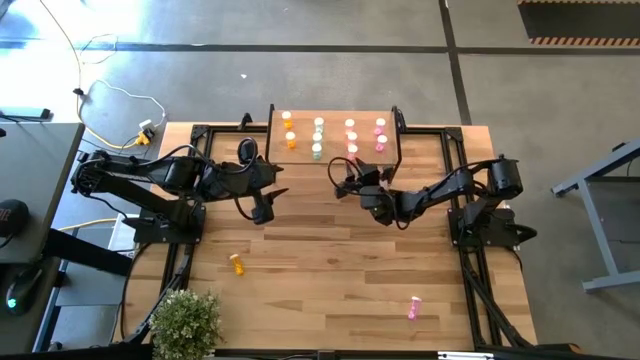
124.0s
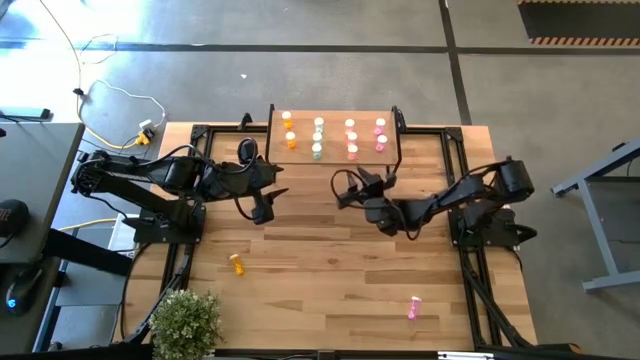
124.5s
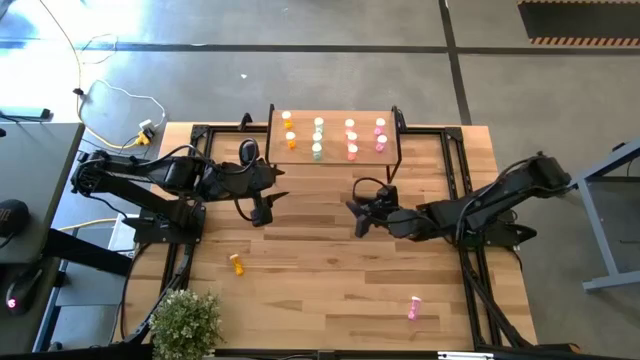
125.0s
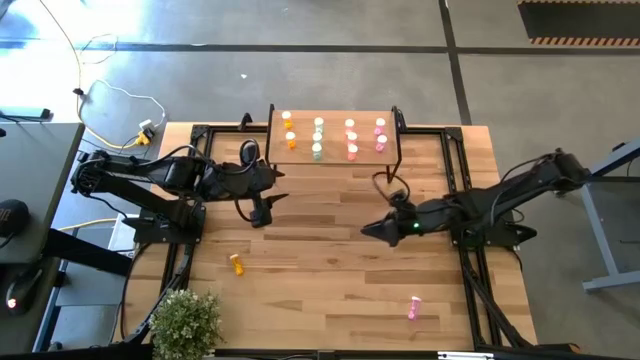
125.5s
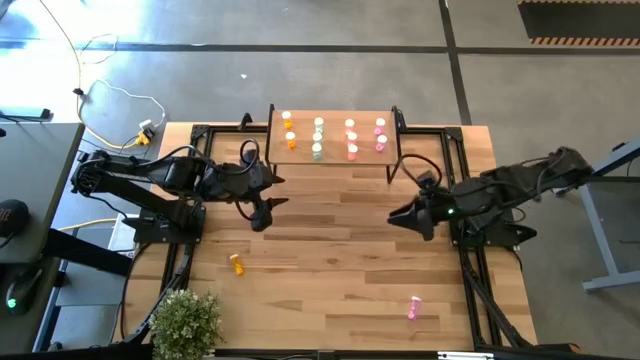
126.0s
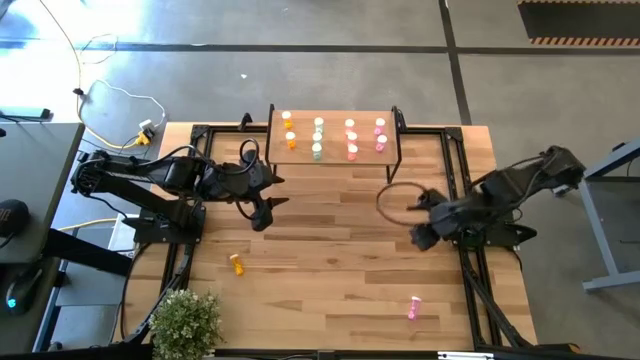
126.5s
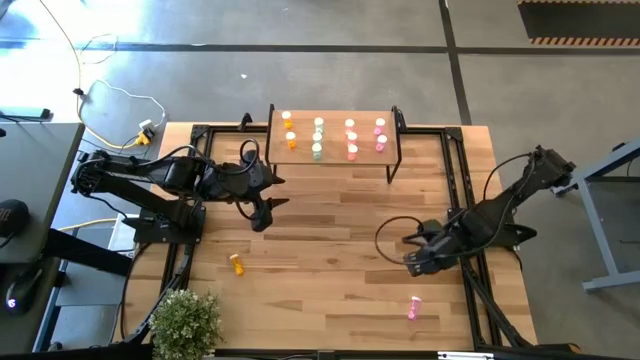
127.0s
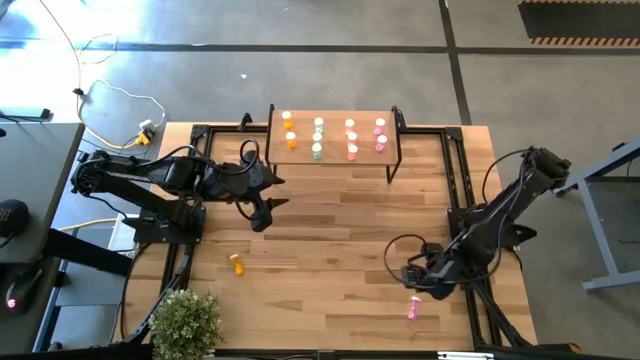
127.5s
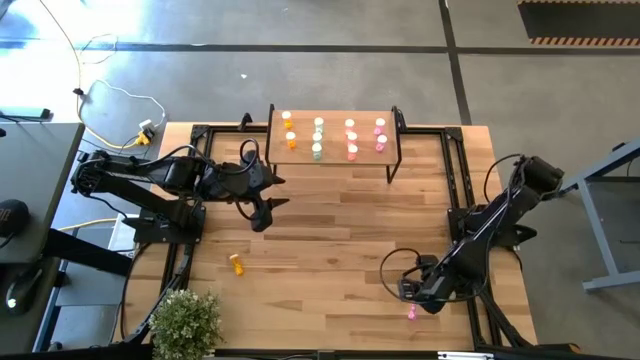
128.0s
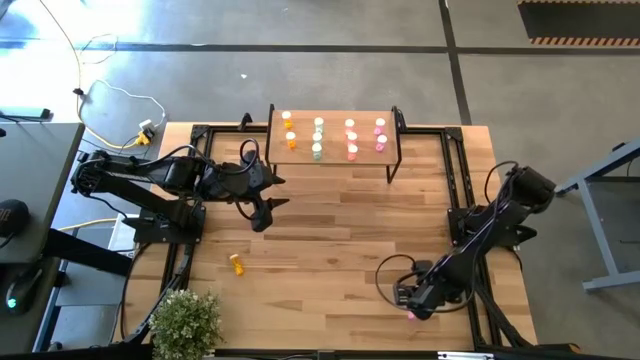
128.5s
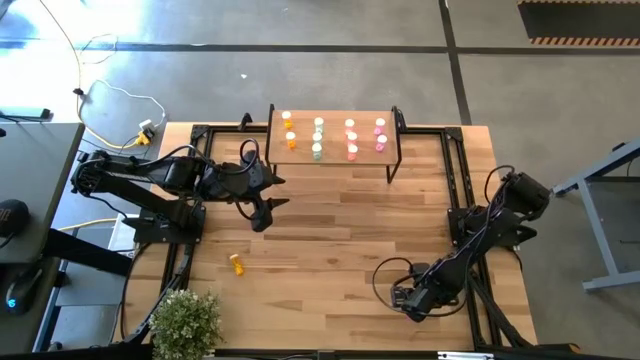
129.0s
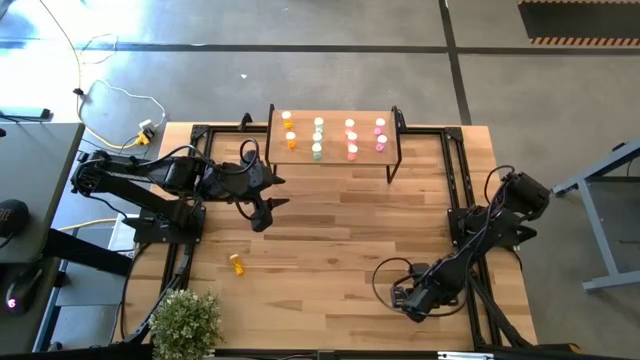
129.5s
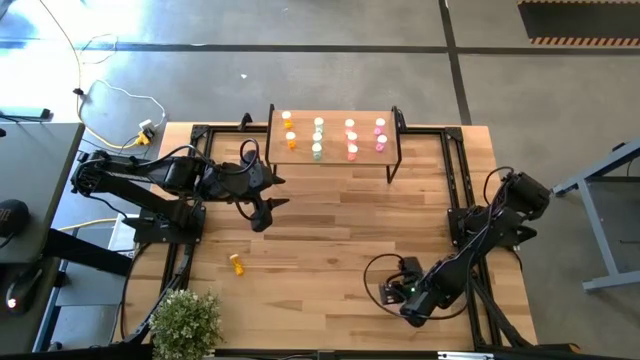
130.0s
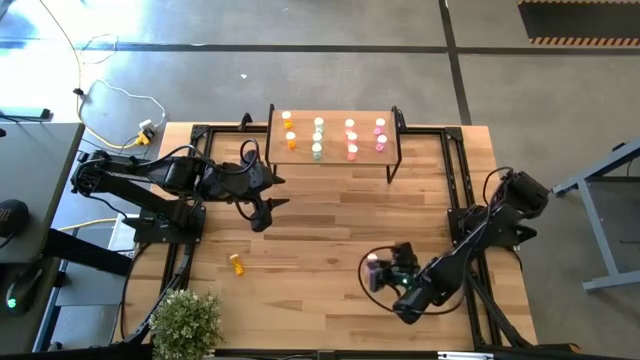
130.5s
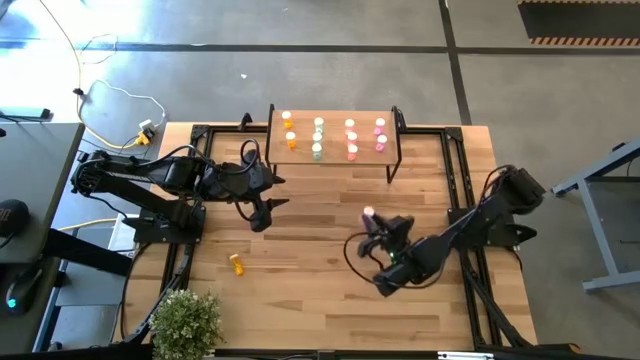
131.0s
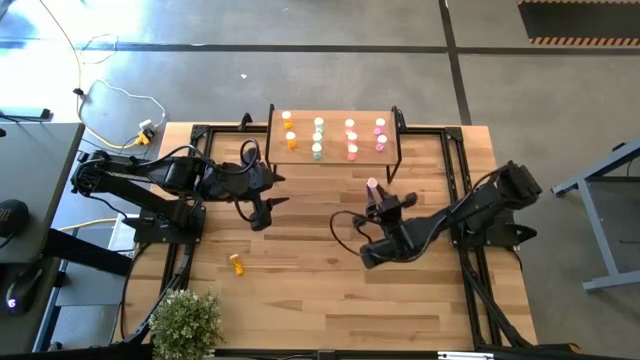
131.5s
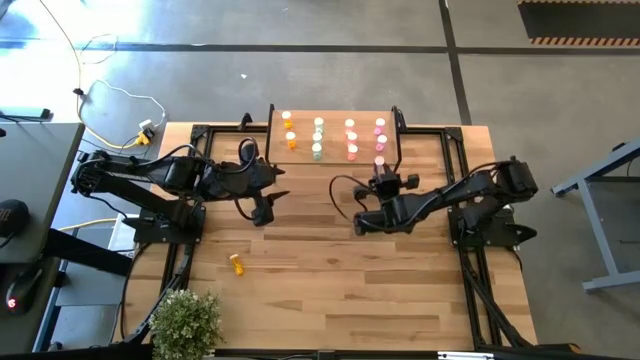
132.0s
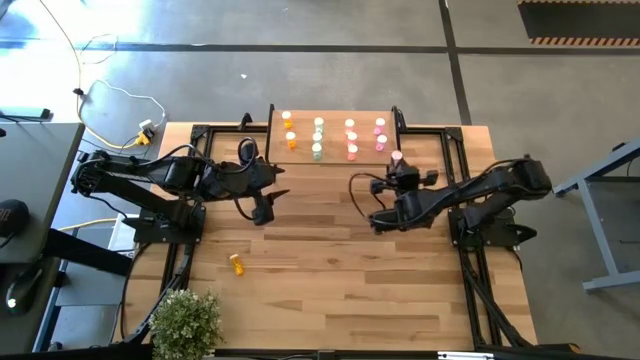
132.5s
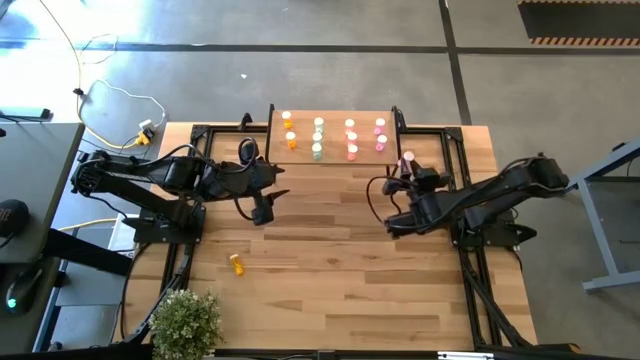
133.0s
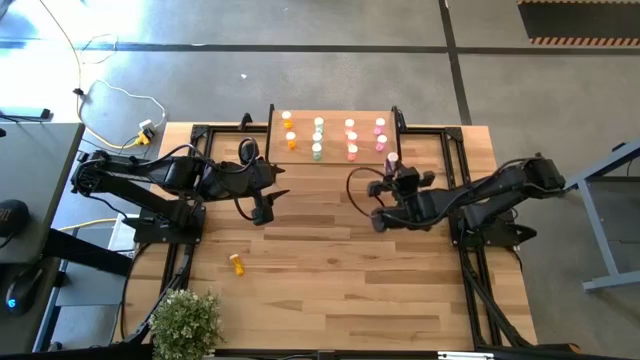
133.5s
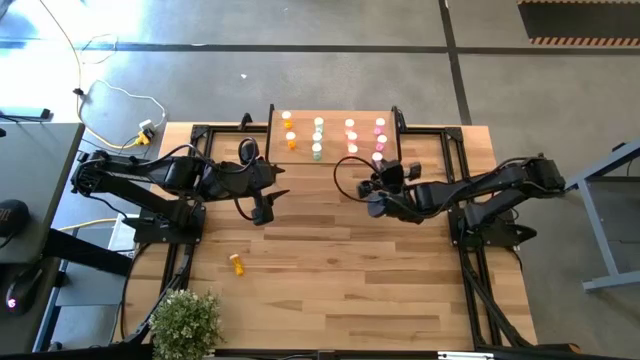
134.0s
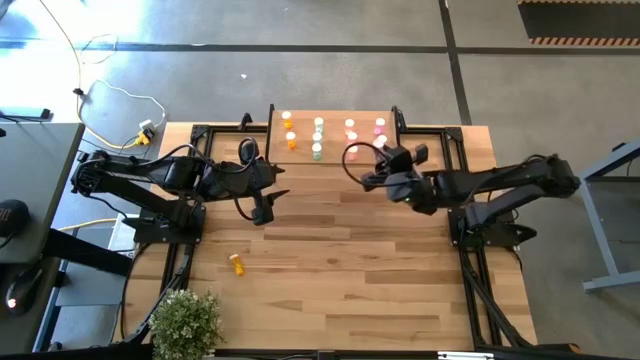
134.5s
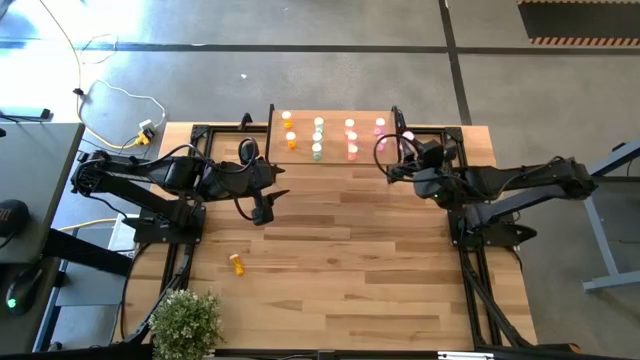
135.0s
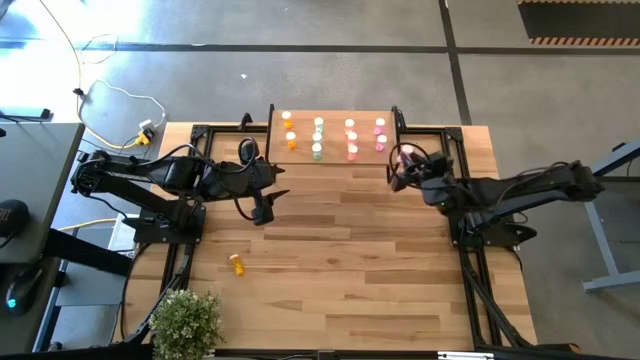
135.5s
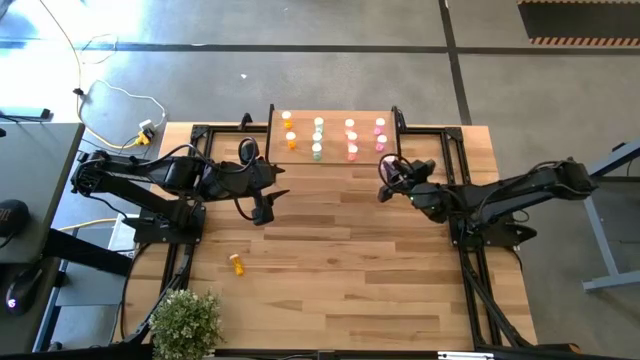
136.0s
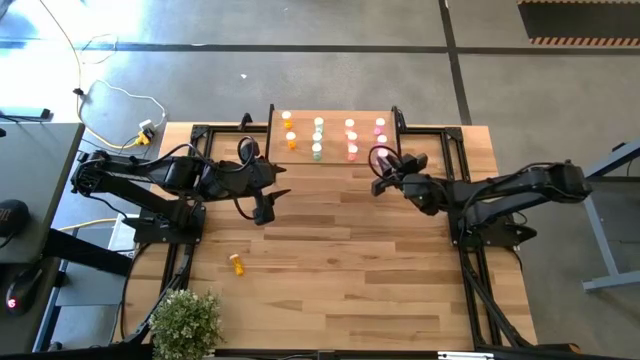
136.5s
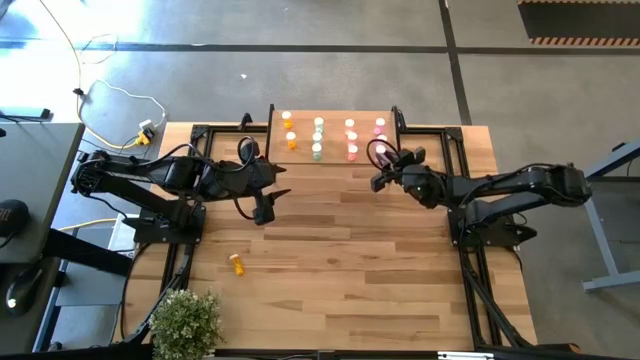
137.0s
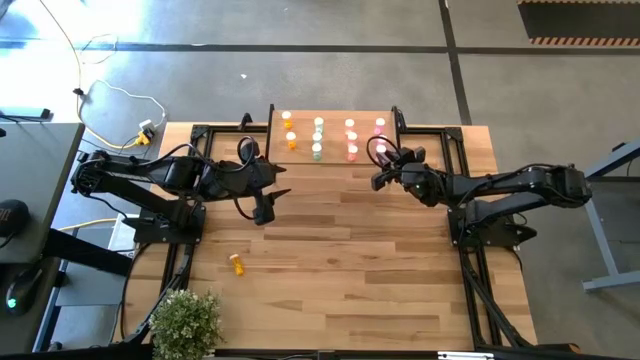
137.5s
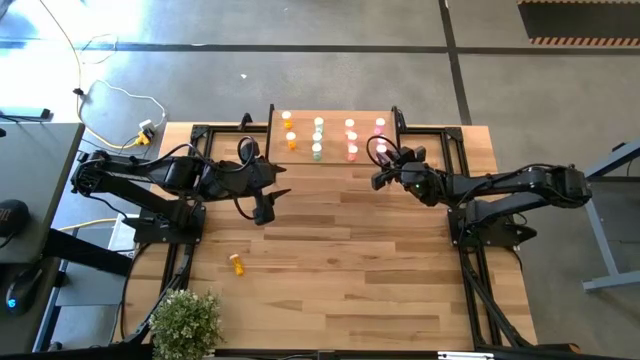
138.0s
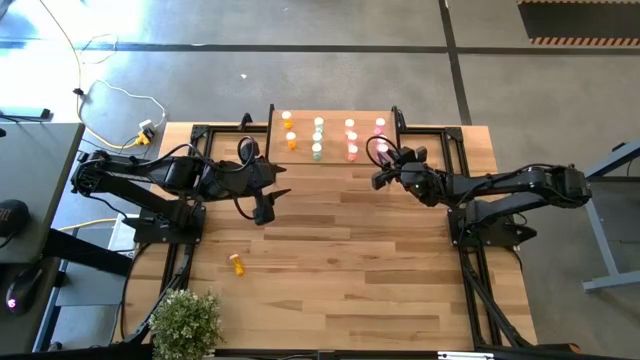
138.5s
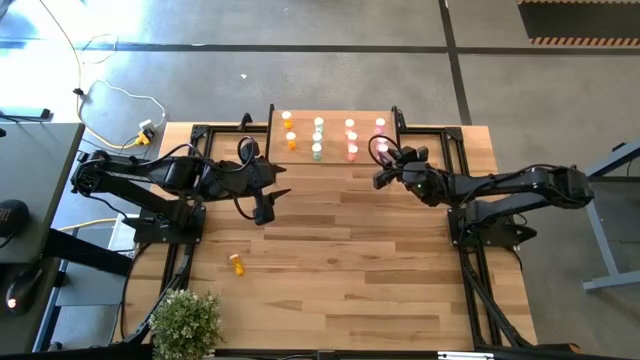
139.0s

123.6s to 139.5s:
Task: Pick and place medicine bottles onto shelf by color
Put the purple pill bottle on the shelf aligned with the purple pill bottles

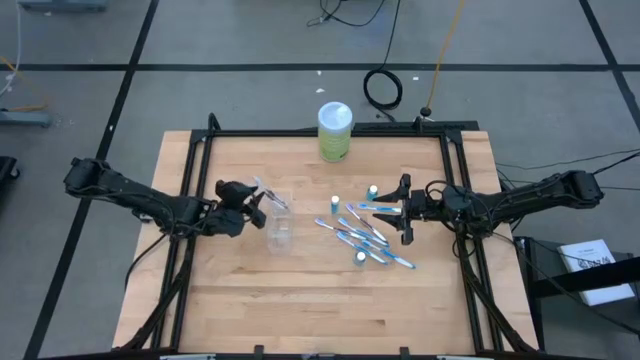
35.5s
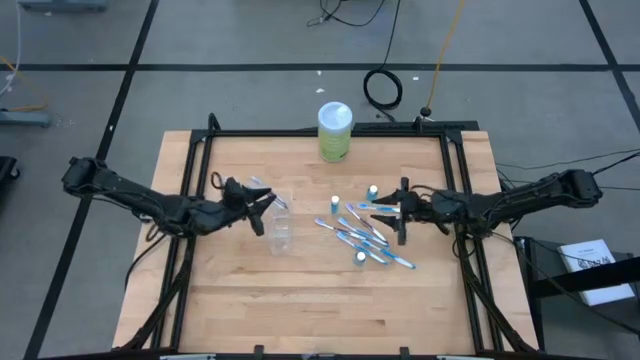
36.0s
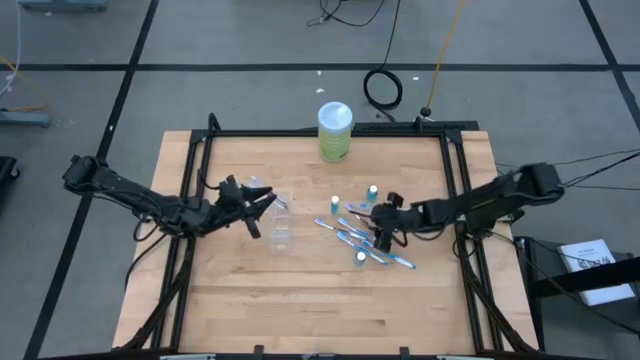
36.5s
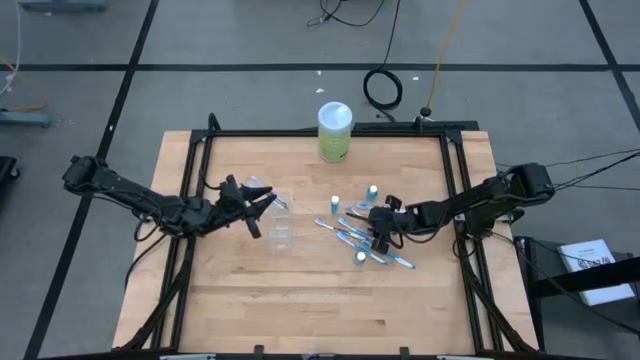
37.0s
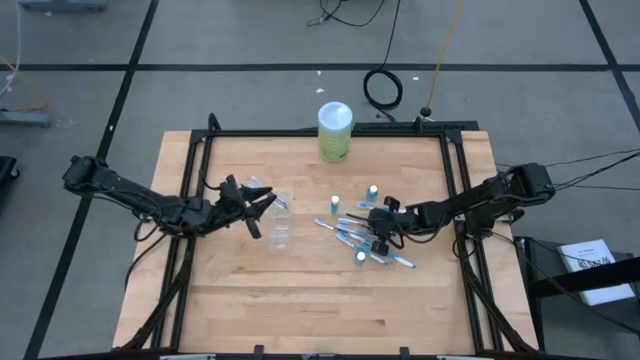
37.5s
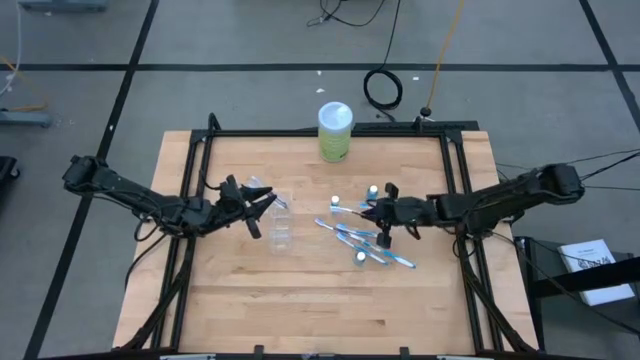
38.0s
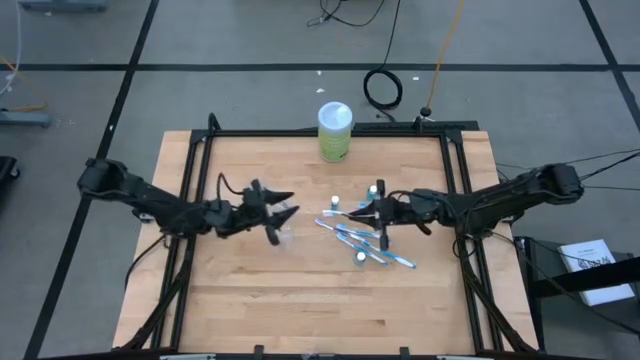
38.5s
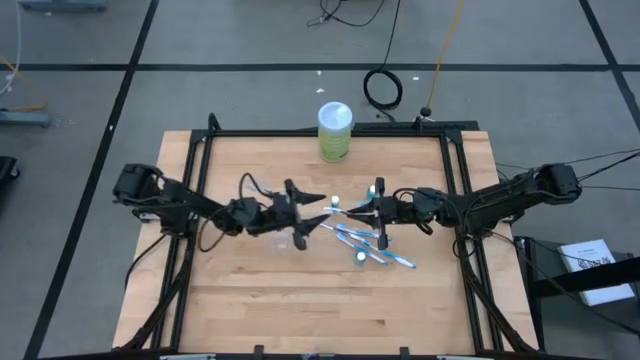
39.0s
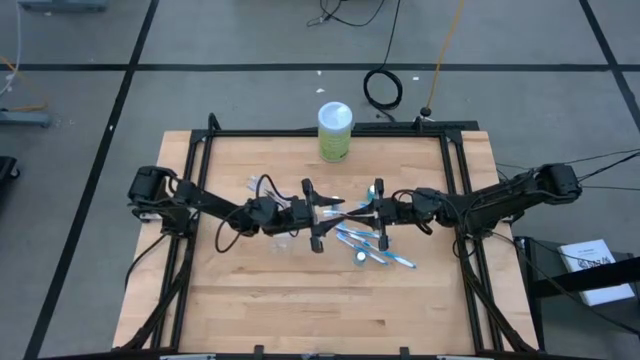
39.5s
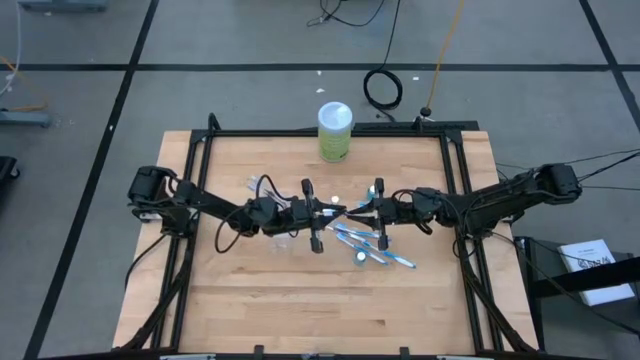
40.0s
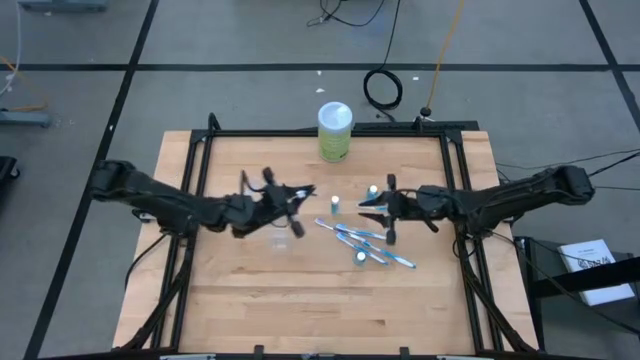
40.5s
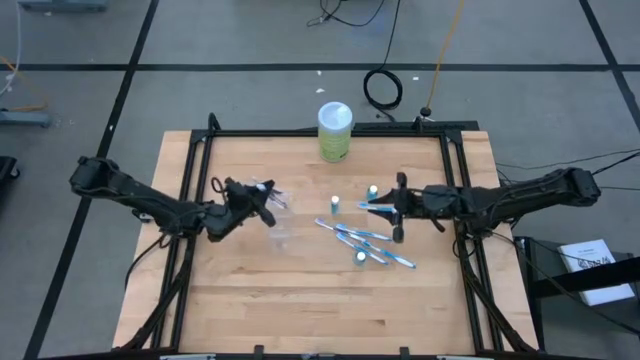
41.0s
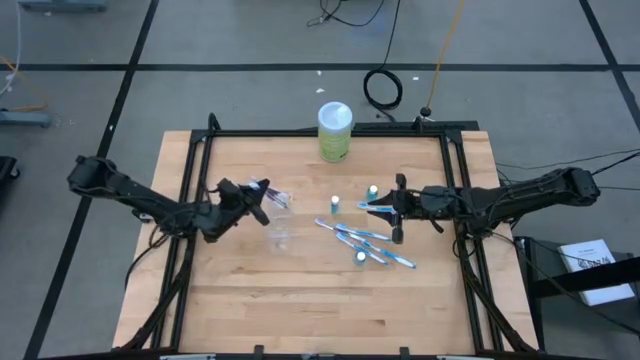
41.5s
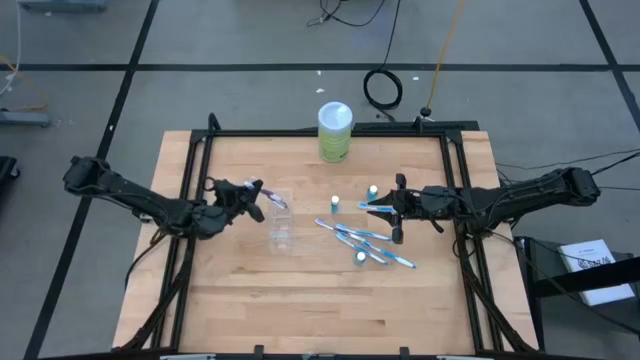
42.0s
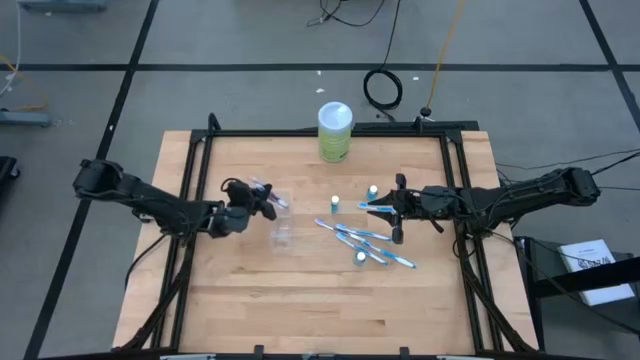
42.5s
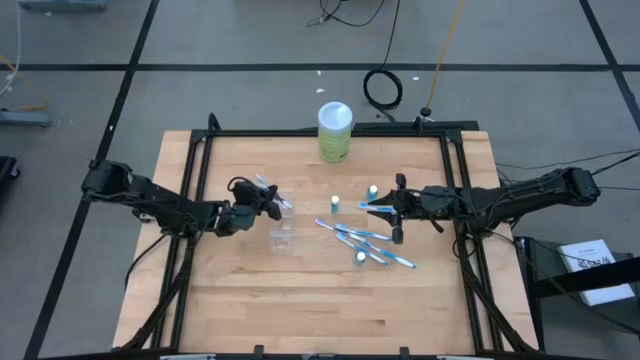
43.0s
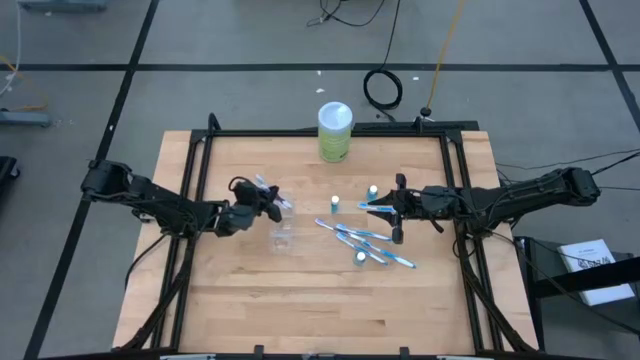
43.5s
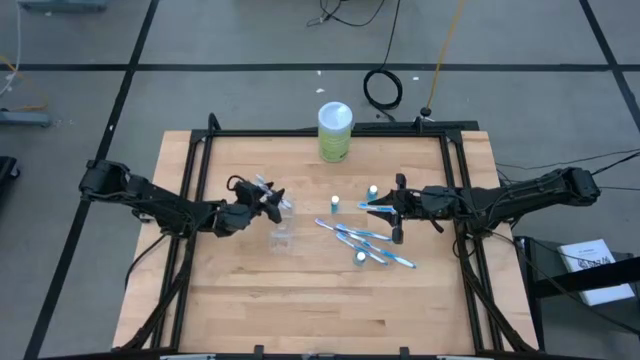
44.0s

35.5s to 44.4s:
Task: Pick & Place toothbrushing station
Put the purple toothbrush into the transparent organizer
